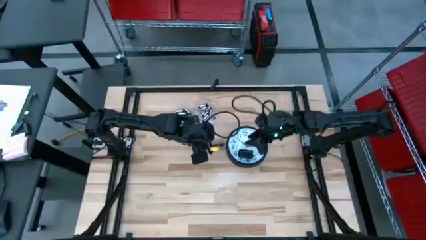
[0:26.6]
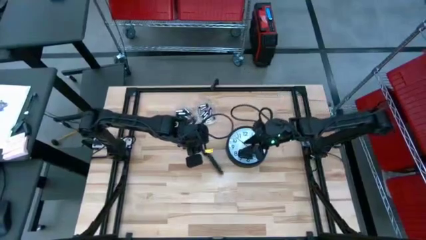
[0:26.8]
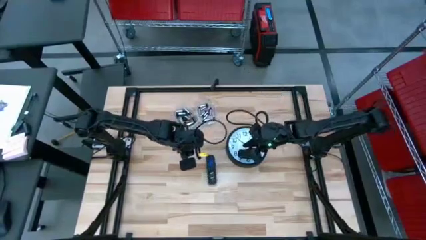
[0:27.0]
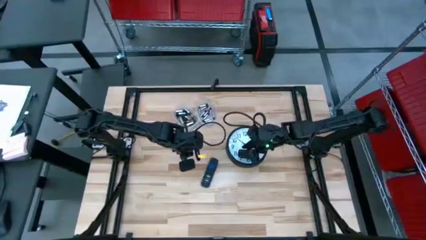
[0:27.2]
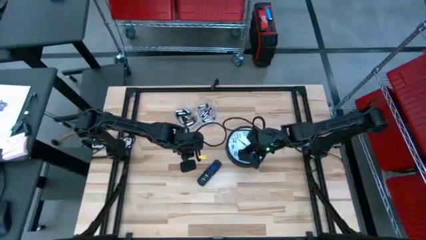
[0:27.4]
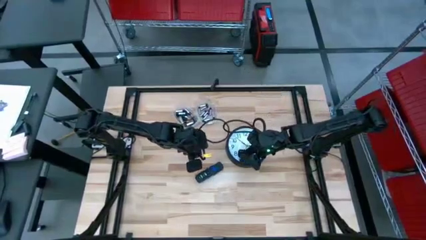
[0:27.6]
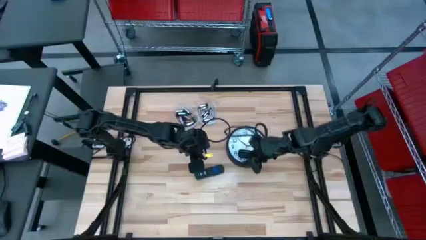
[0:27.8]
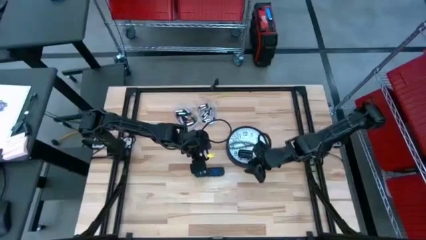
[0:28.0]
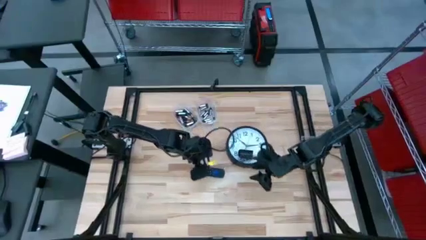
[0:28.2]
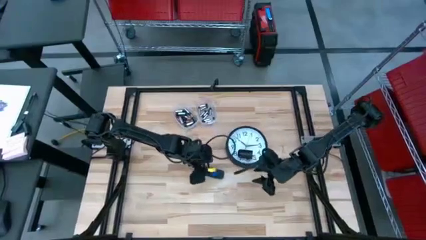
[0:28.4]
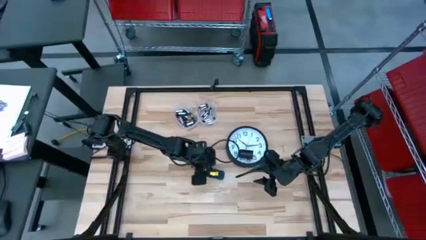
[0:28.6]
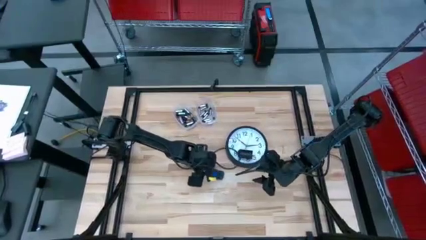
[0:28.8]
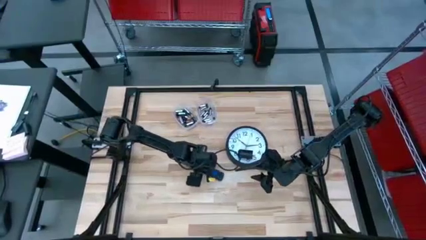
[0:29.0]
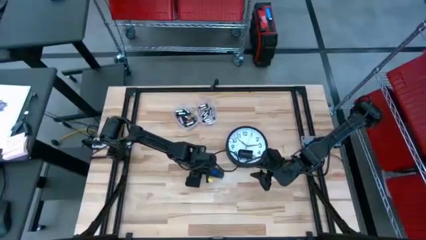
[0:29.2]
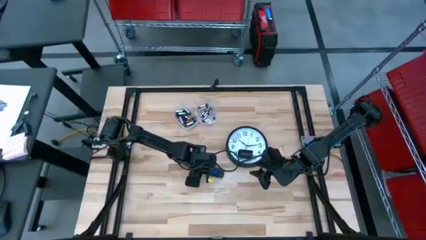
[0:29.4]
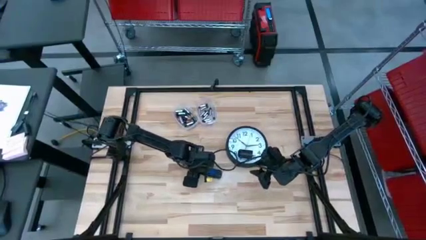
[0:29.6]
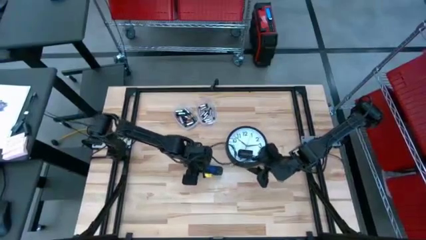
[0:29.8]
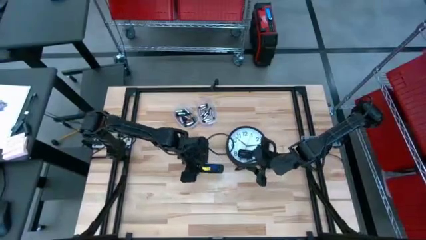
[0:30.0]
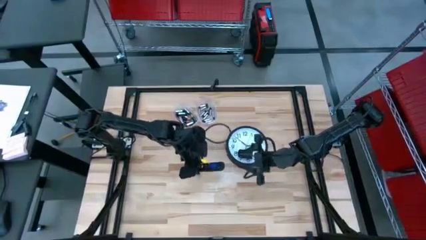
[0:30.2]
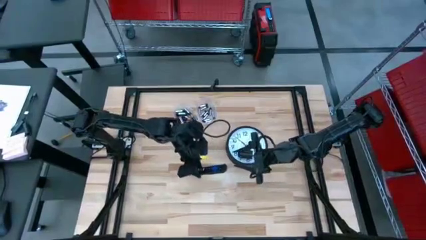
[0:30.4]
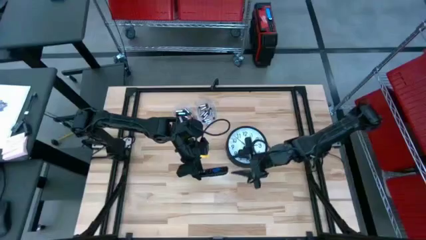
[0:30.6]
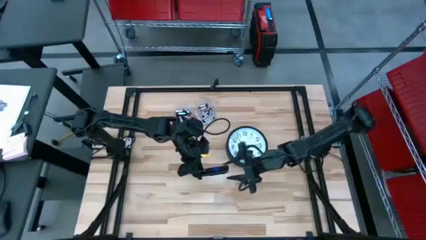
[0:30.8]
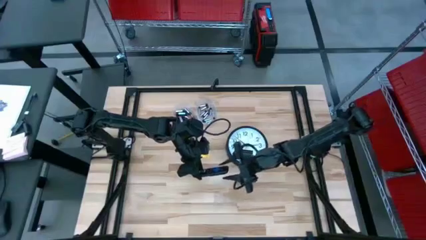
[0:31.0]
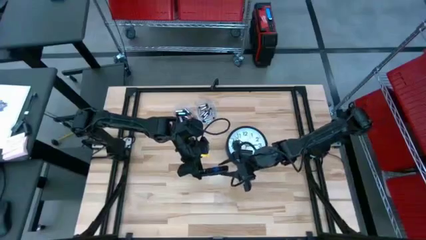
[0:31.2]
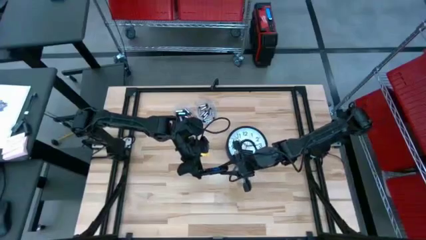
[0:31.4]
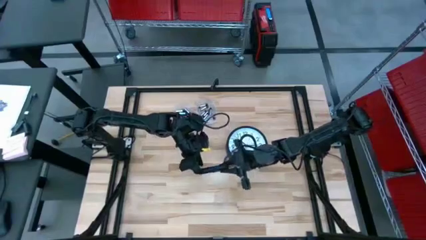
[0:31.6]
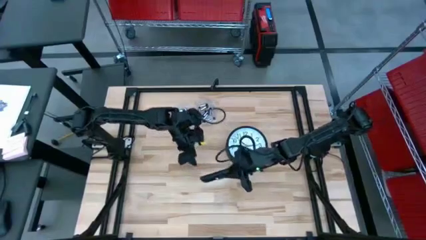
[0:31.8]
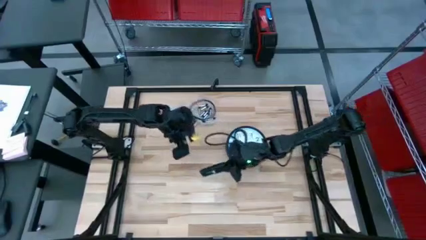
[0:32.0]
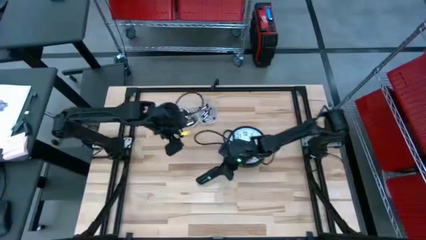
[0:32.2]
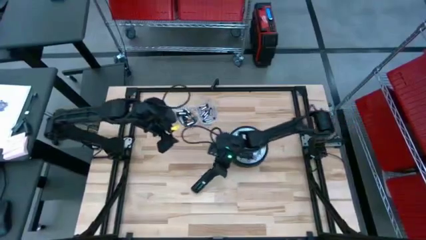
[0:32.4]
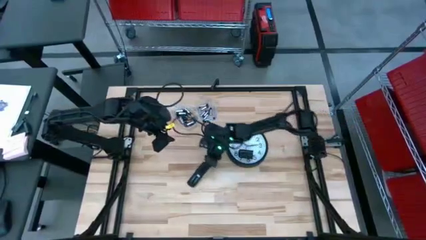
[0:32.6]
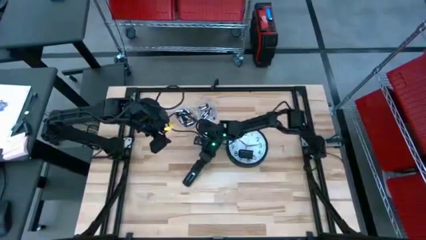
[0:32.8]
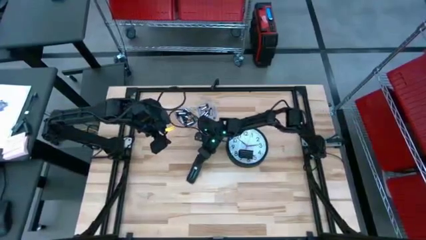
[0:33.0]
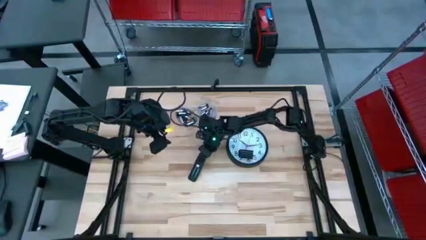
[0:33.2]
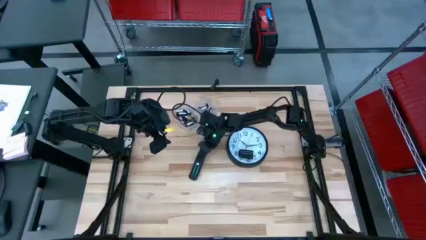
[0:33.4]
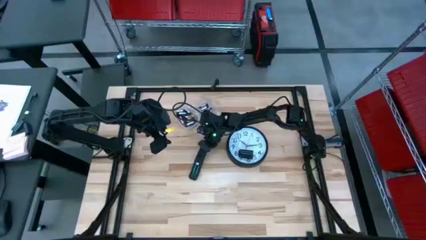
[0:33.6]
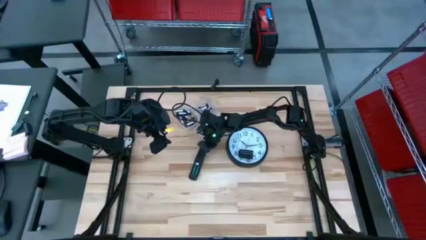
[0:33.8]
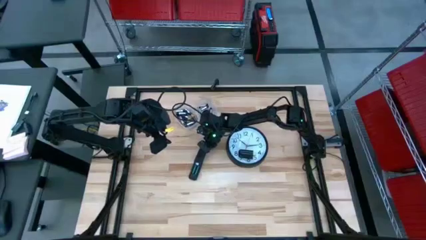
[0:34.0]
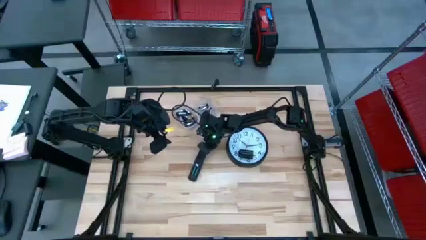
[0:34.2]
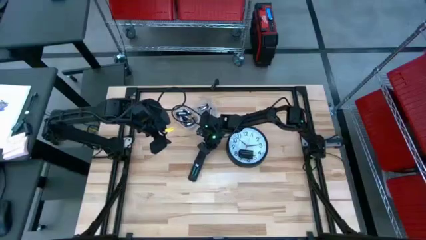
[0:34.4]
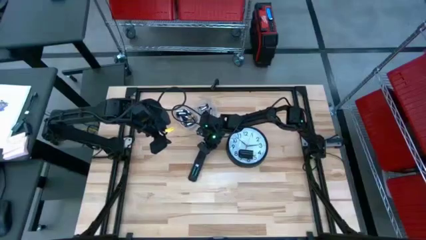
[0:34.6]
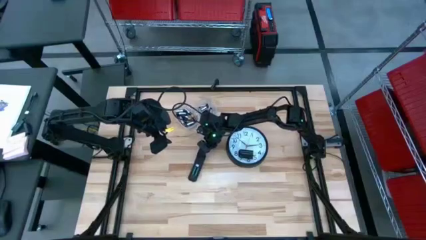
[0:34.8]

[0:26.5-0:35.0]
Task: Insert battery
Open the remote battery cover

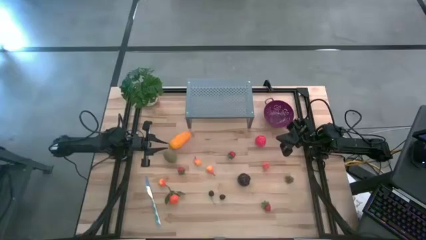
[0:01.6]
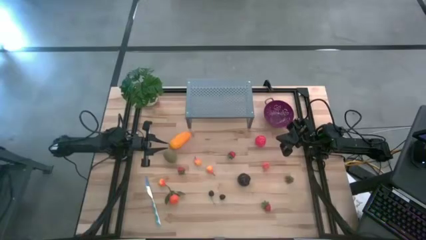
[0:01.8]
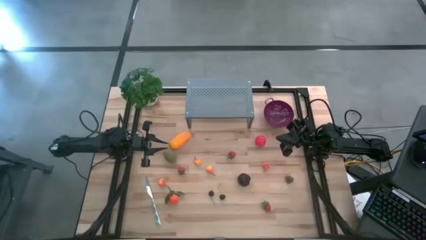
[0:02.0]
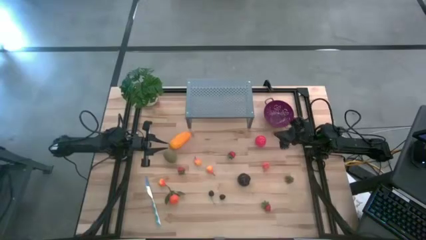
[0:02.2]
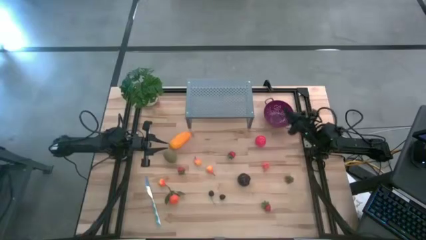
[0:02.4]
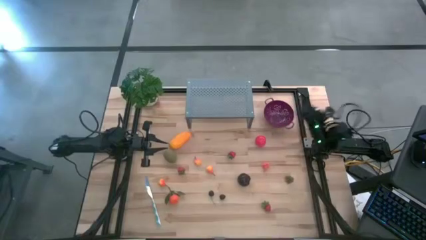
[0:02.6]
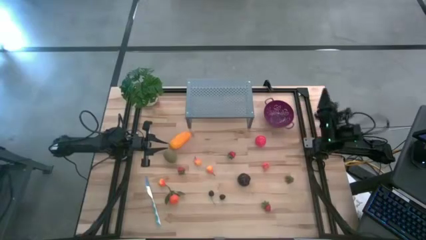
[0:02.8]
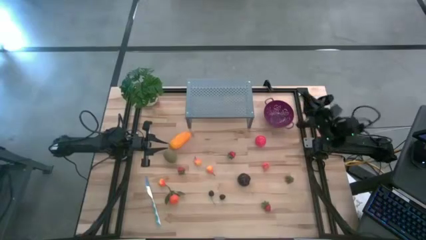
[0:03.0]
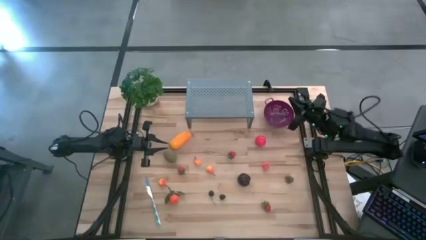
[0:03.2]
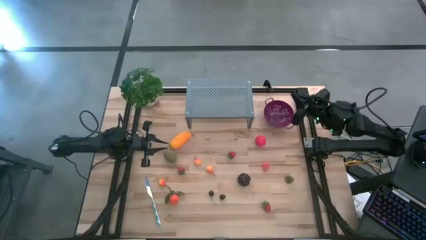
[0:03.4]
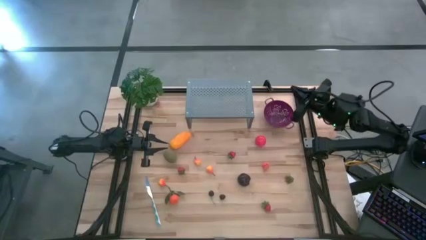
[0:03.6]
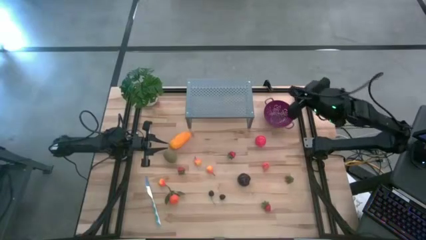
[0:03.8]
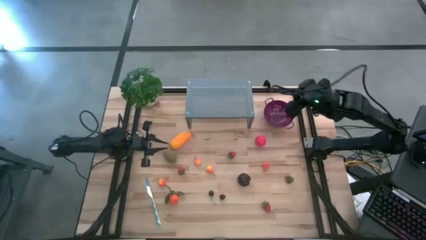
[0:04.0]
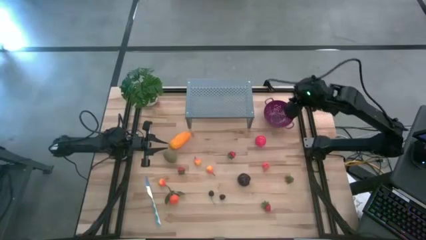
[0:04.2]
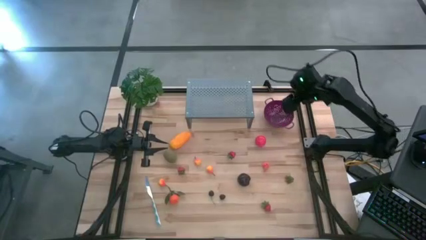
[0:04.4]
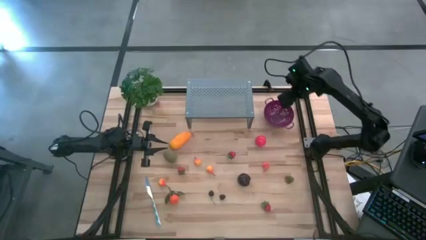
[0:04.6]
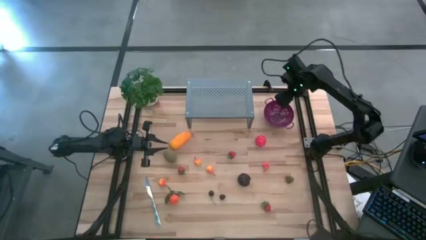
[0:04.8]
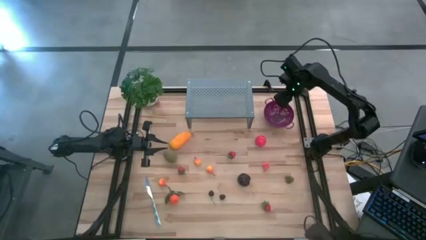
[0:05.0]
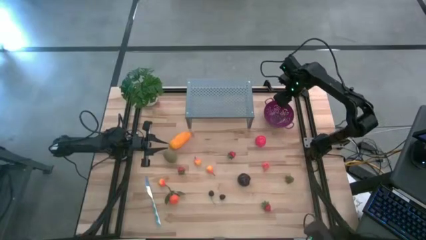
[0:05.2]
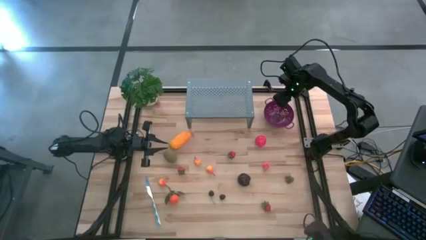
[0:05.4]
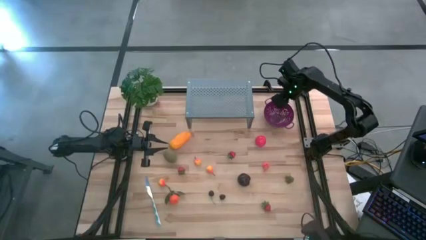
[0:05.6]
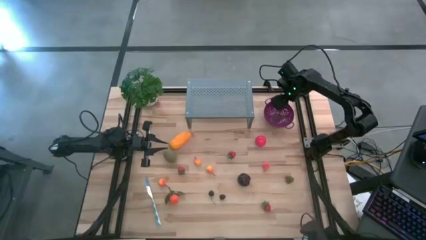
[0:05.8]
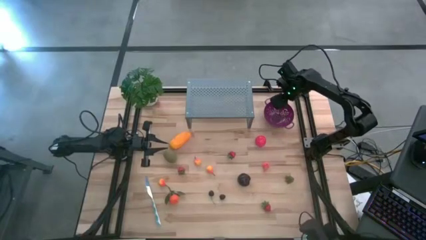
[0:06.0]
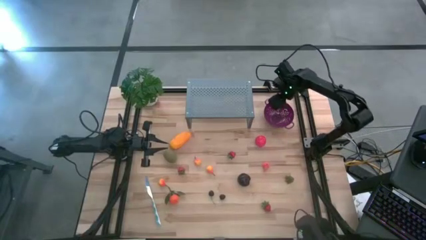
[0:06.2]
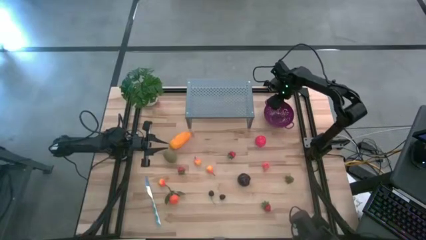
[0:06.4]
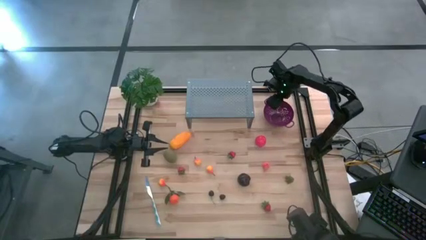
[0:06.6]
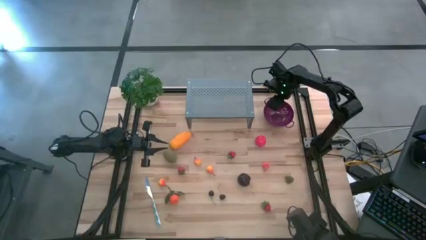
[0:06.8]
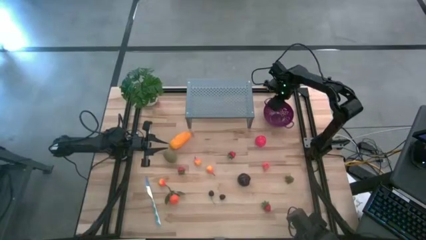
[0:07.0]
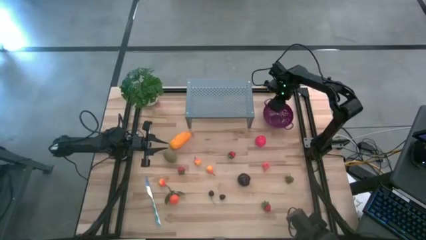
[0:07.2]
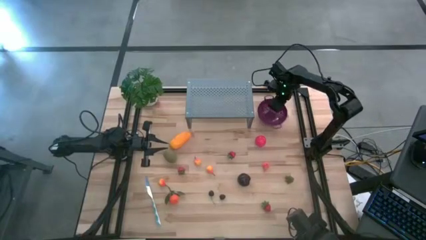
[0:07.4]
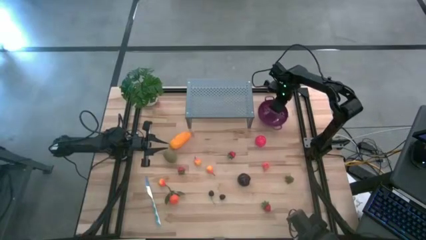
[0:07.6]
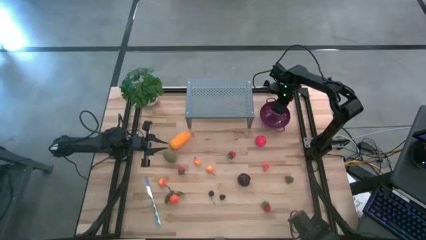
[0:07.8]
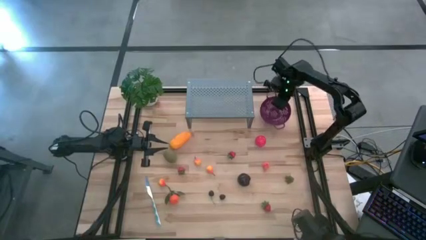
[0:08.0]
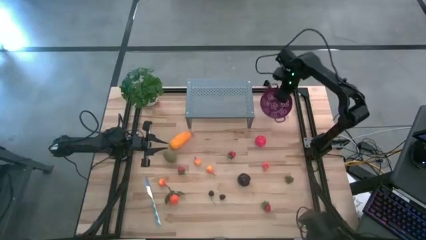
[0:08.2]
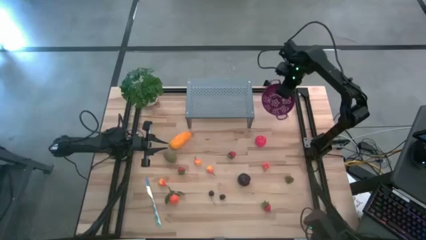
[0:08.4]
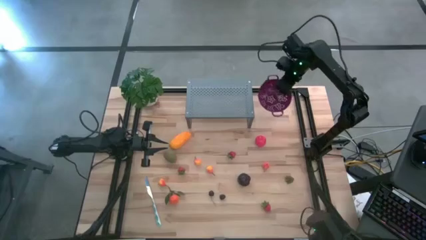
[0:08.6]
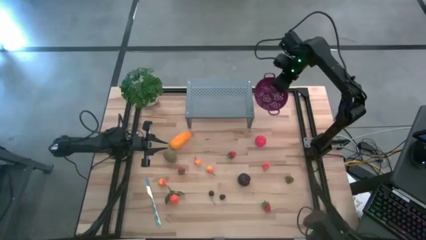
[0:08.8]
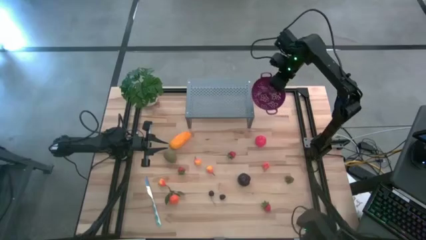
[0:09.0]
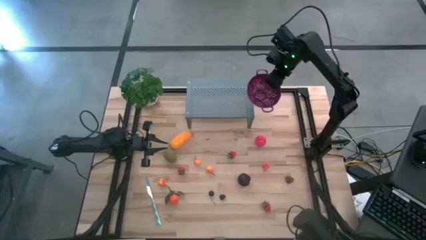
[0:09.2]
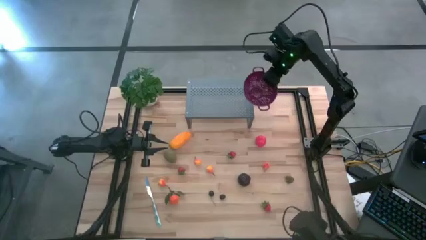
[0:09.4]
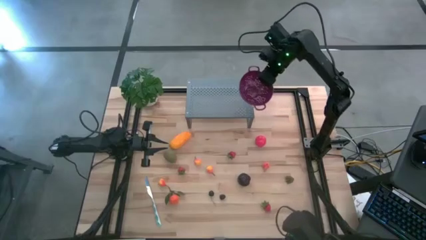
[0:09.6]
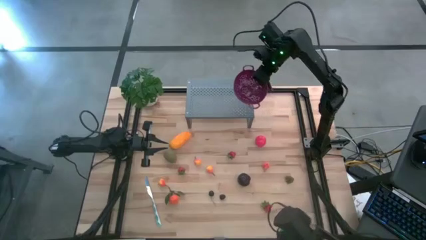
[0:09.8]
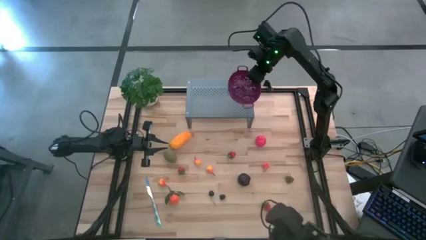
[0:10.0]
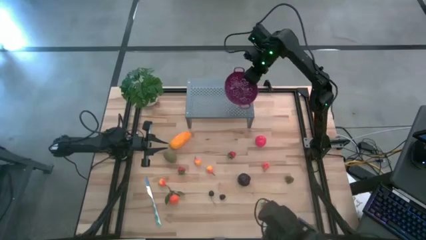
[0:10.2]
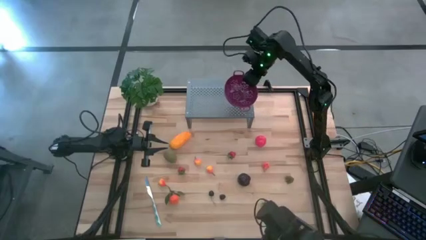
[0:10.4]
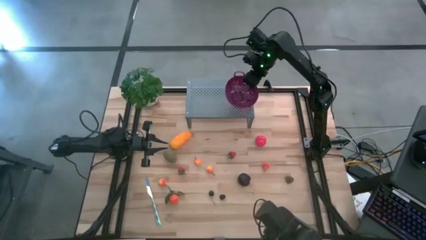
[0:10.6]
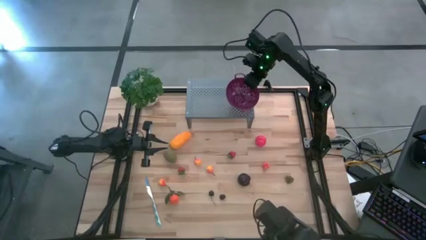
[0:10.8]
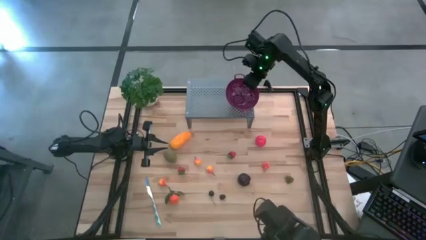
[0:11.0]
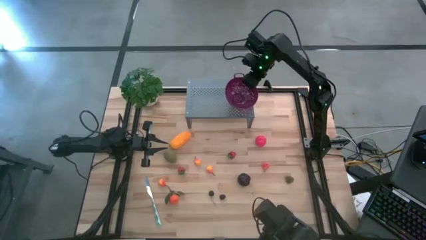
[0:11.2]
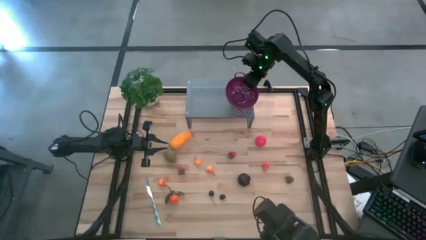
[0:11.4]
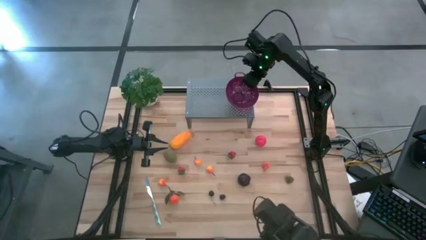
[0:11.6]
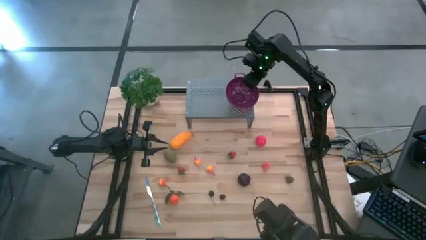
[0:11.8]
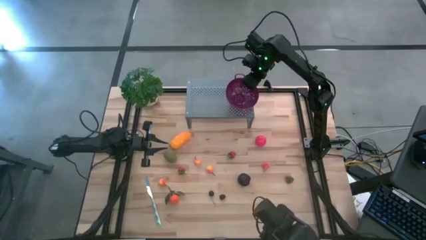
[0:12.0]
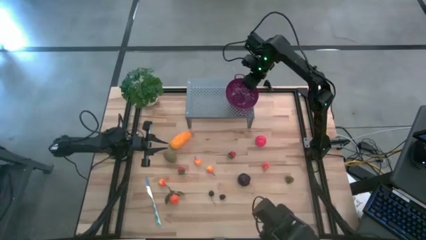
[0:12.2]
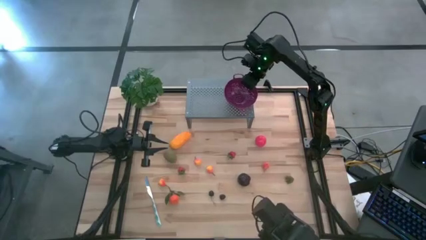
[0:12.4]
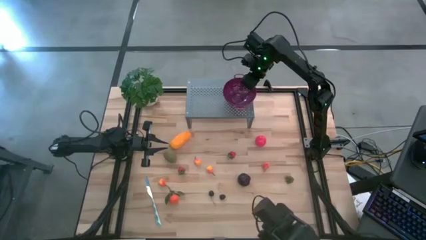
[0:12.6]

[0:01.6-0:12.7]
Task: Pick & Place Fruit
Put the violet strainer bowl on the shelf
